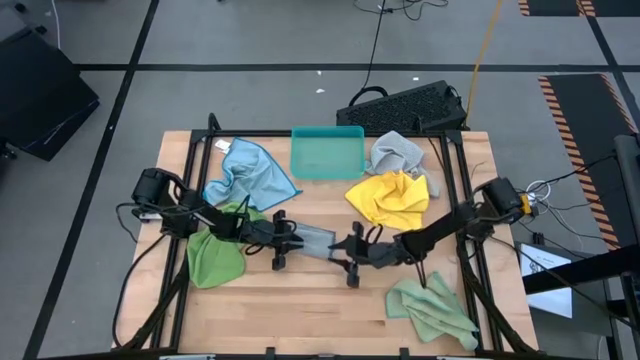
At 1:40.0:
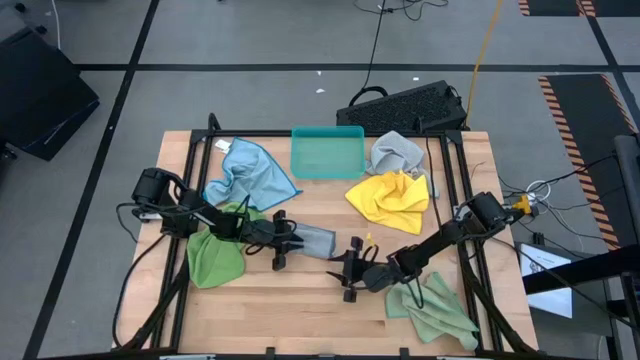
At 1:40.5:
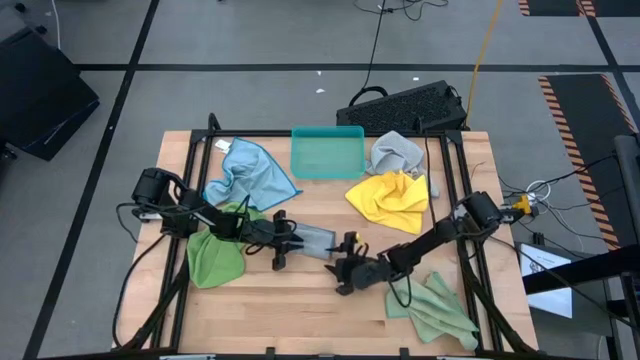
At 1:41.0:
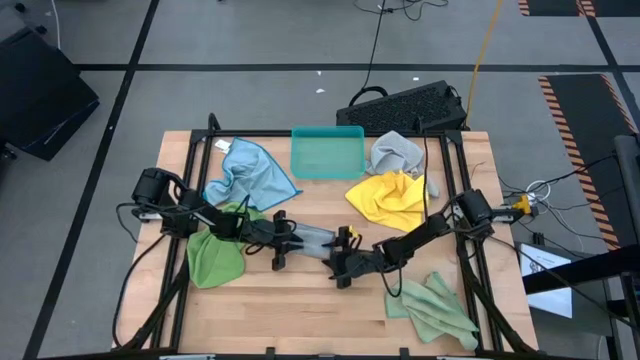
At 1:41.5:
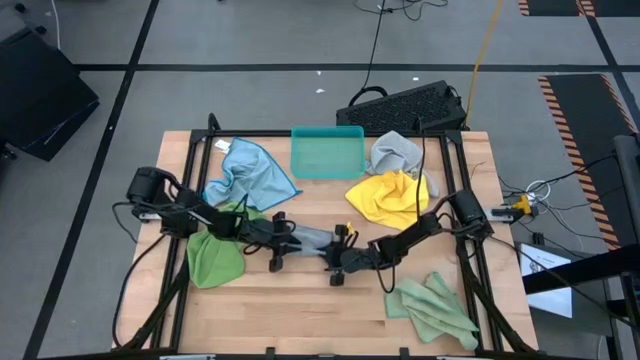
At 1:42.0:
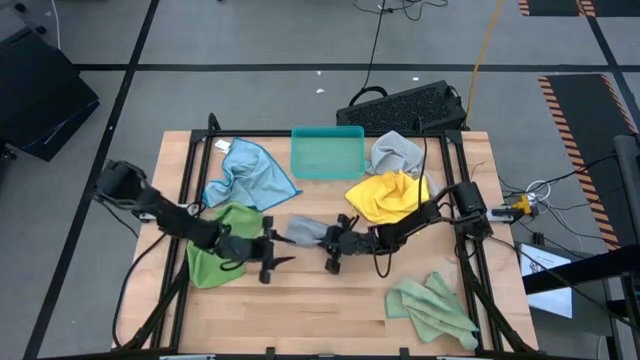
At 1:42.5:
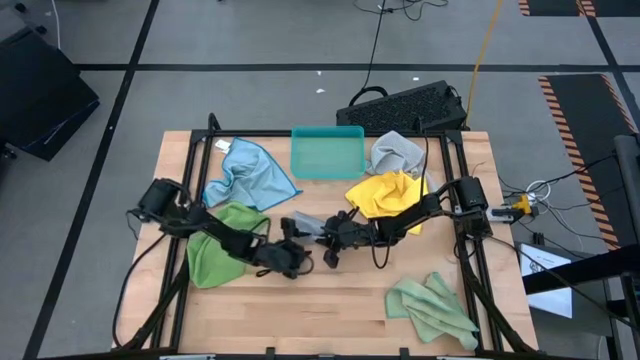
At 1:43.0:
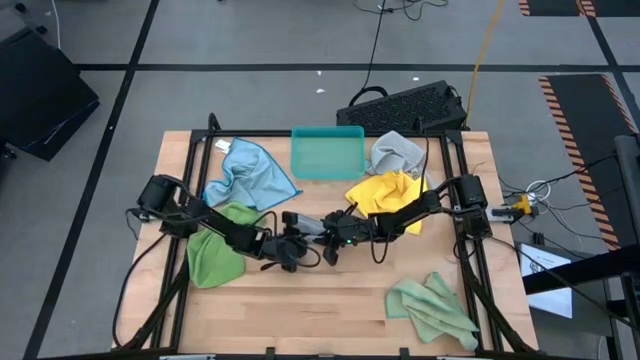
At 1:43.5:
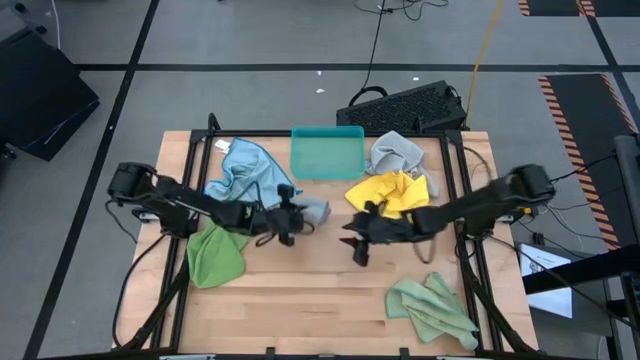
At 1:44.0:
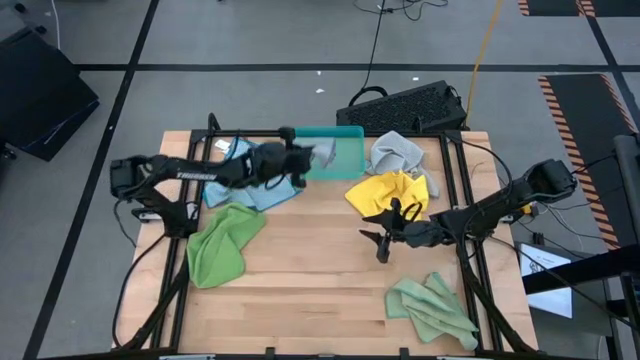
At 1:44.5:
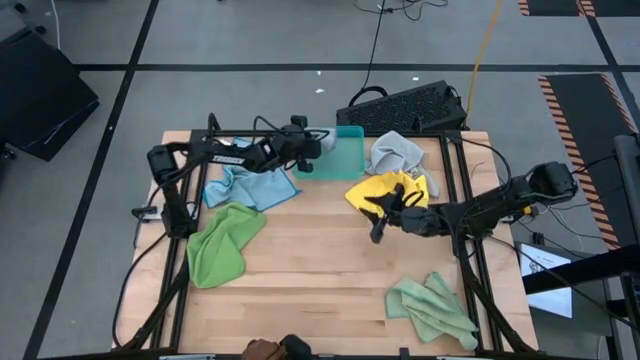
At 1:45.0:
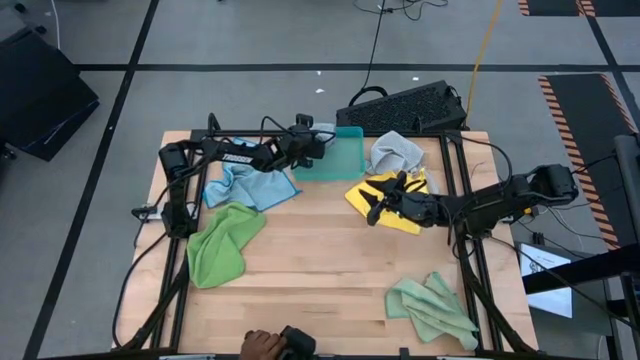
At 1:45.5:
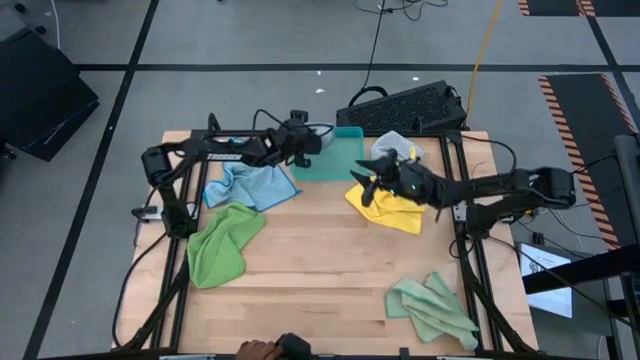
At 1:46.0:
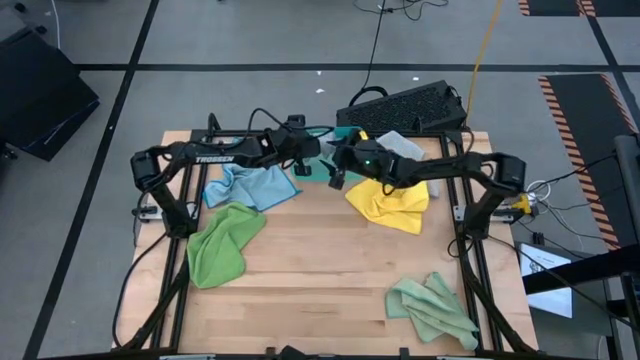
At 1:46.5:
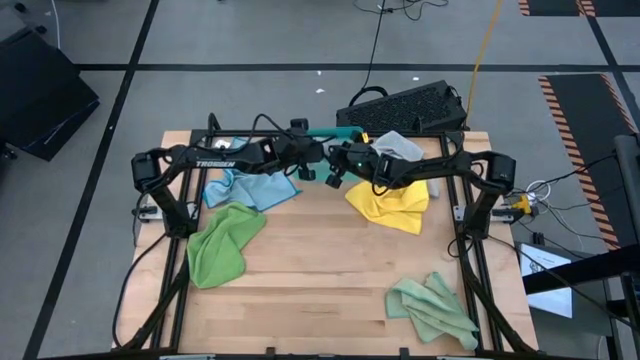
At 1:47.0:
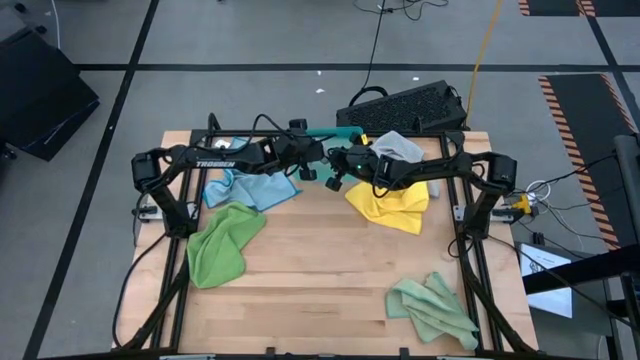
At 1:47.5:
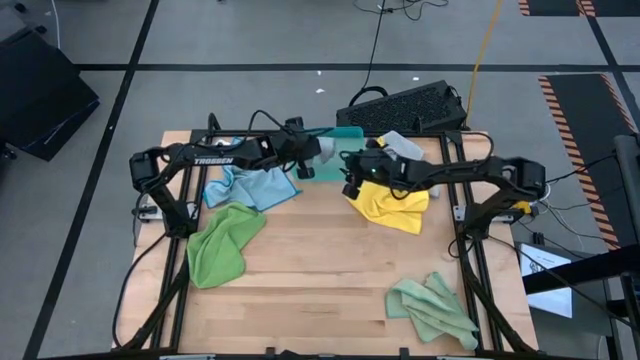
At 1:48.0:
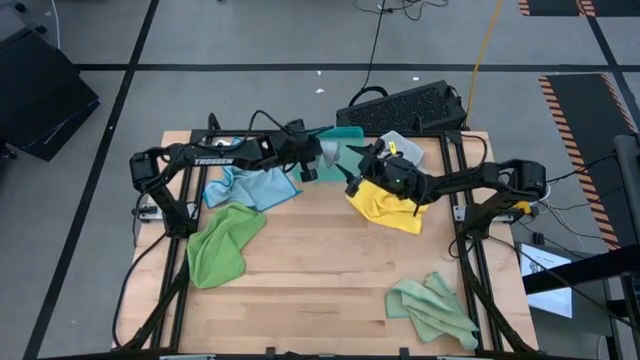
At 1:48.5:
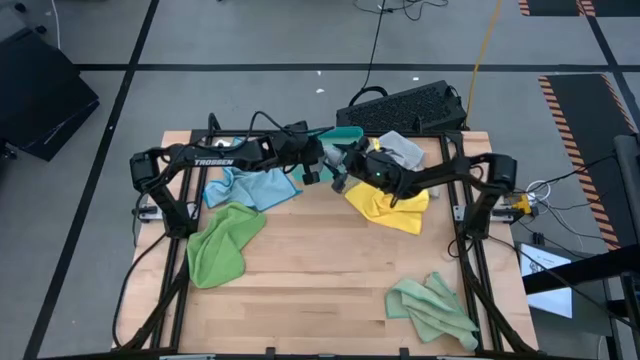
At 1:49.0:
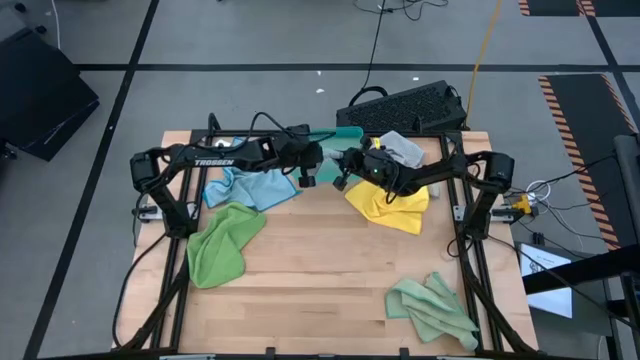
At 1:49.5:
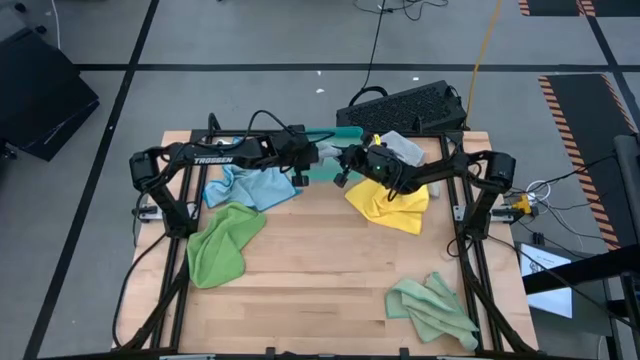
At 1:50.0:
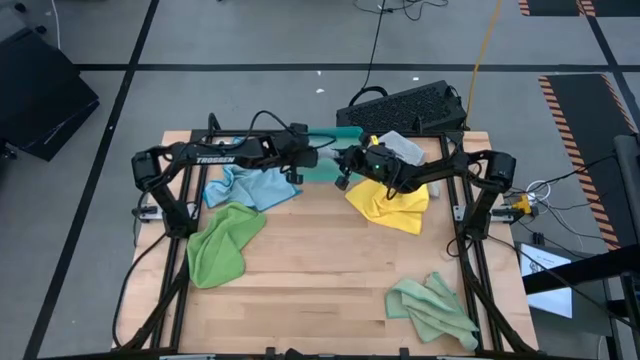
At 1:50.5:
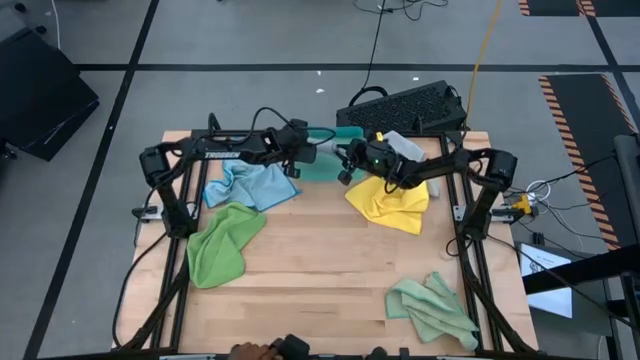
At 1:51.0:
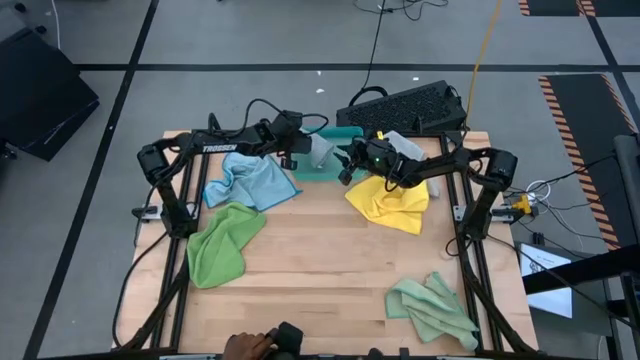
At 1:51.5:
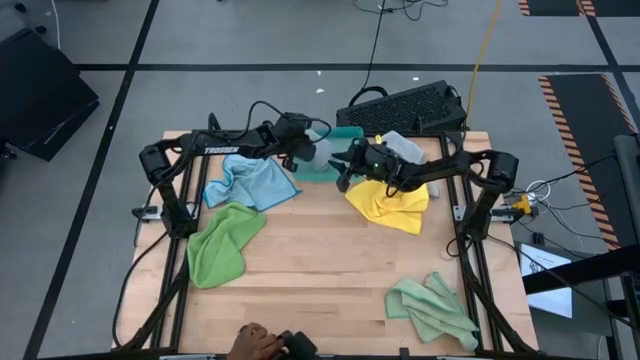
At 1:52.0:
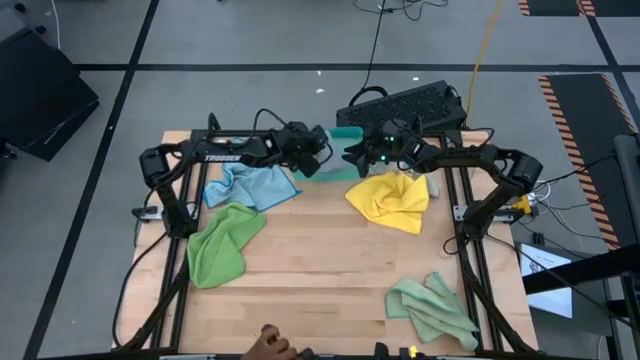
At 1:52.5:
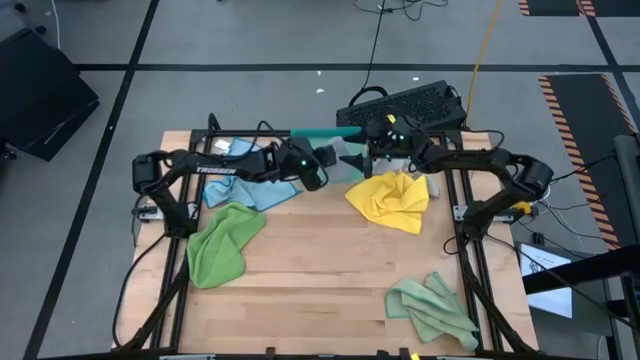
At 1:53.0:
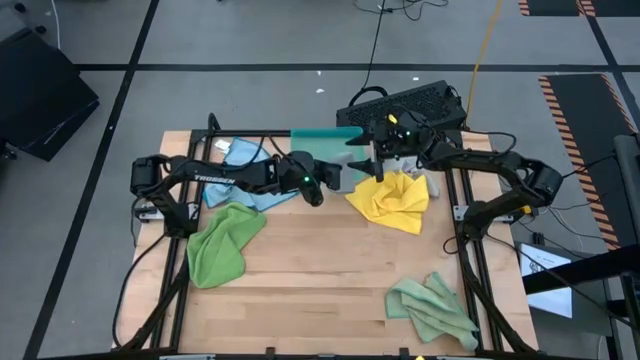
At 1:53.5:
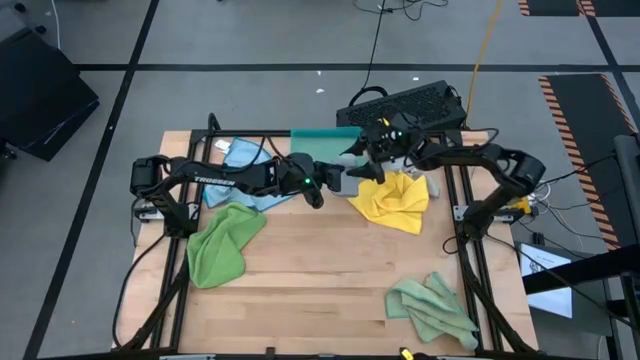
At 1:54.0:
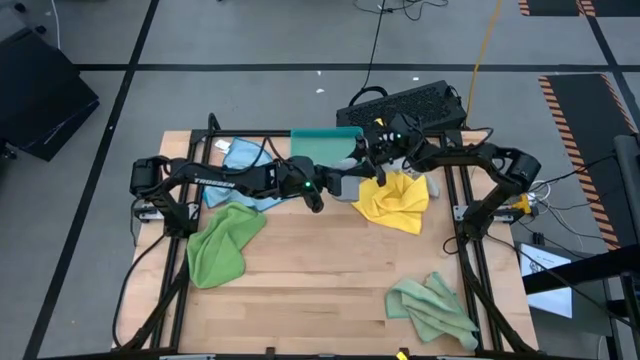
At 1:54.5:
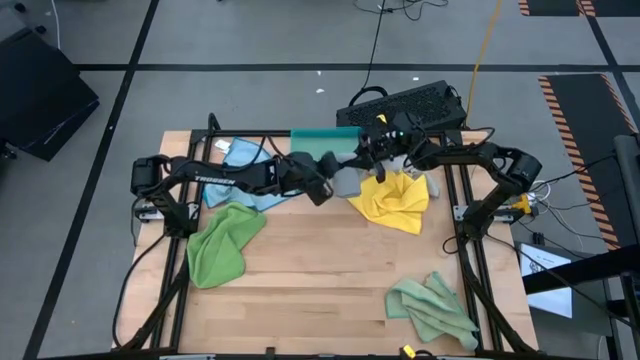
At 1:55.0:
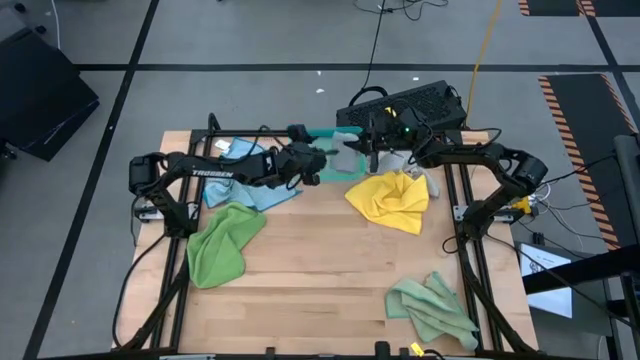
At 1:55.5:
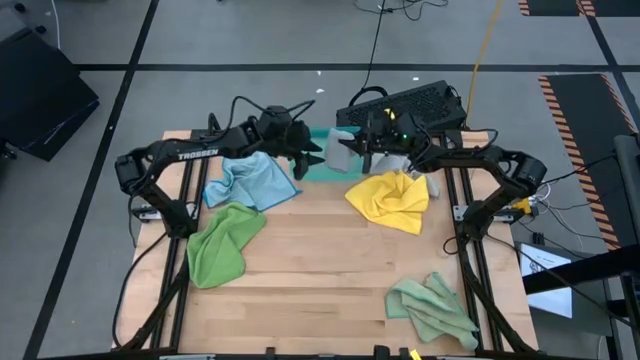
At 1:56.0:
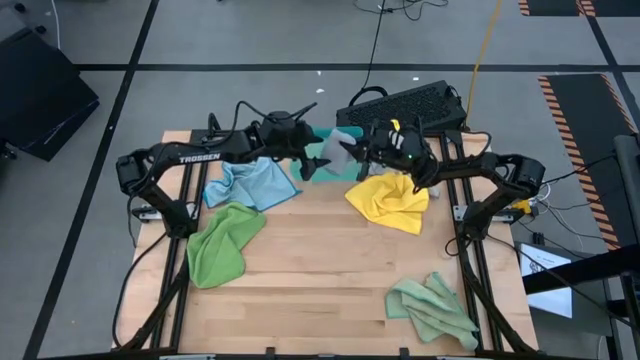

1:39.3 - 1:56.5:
Task: Fold microfiber towels
Put the folded dark gray microfiber towel into the green bin

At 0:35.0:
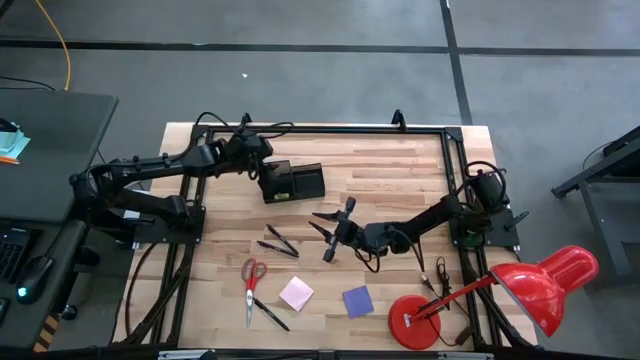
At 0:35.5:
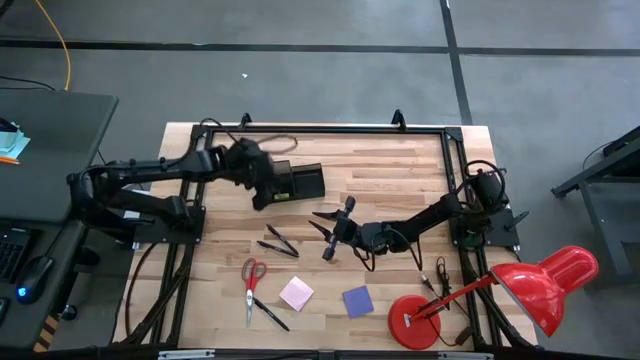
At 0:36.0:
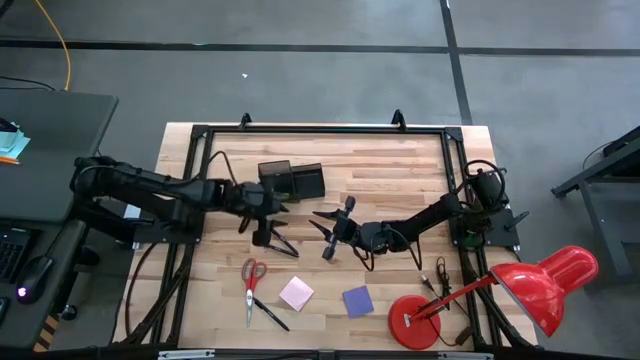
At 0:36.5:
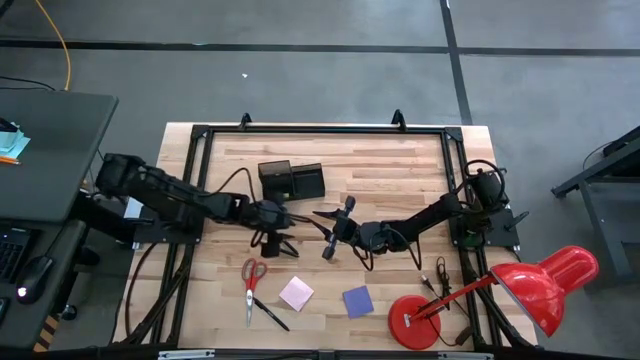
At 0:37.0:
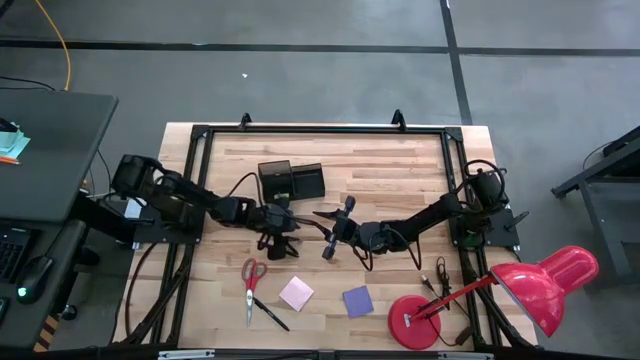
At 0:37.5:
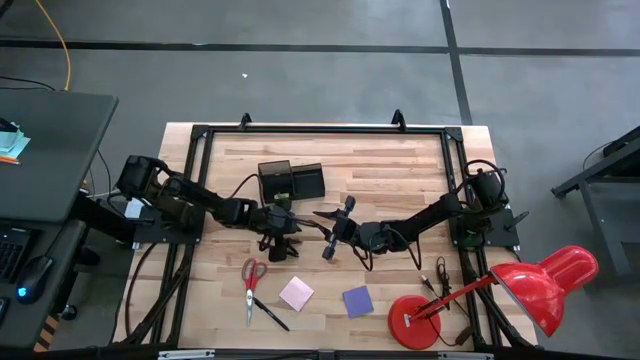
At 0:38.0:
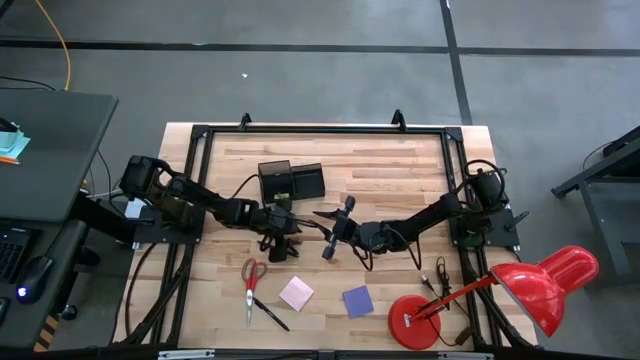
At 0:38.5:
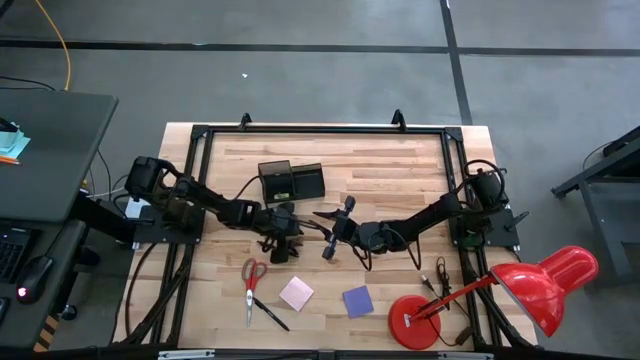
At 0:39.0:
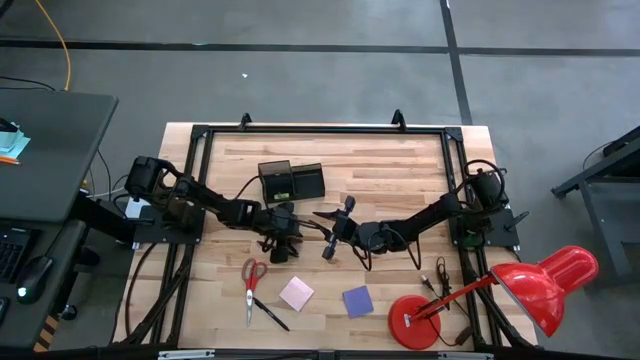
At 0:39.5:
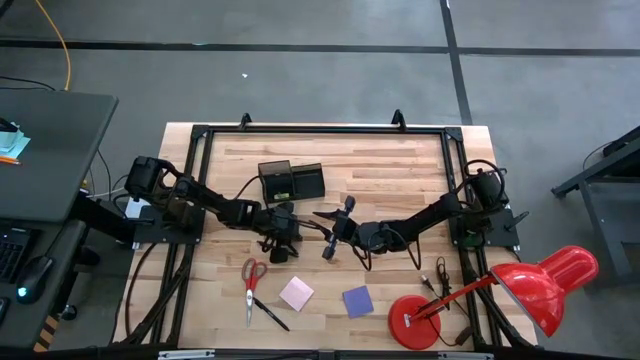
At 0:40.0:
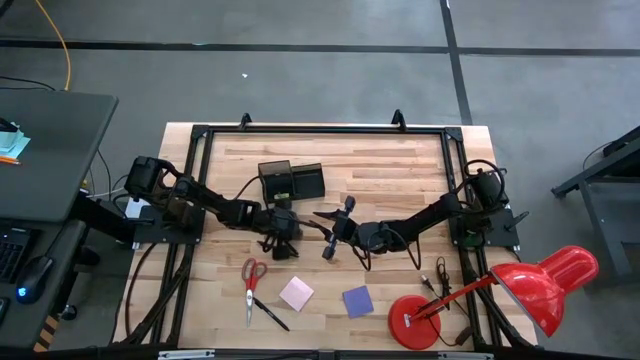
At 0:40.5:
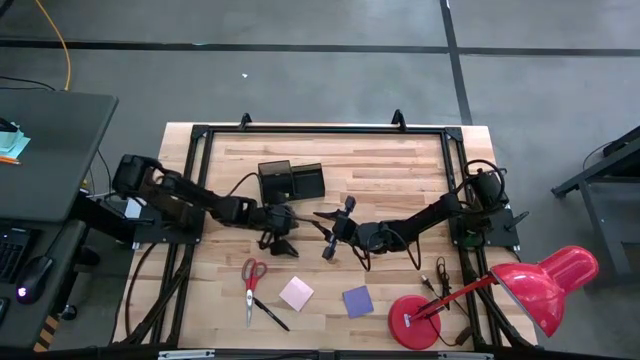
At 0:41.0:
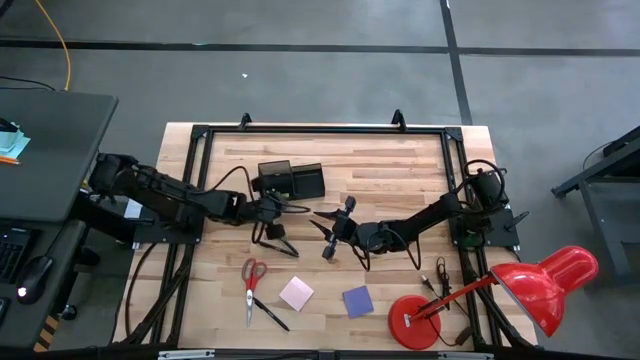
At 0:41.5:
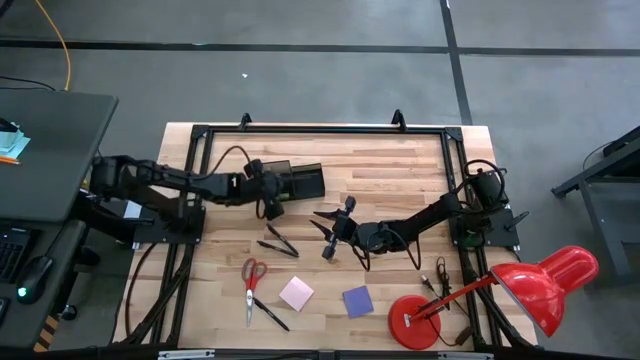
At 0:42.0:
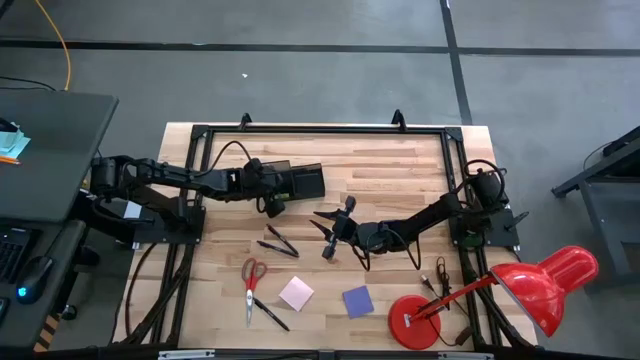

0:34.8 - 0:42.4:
Task: Pick and place office supplies into organizer
Put the pink binder clip into the black desk organizer
